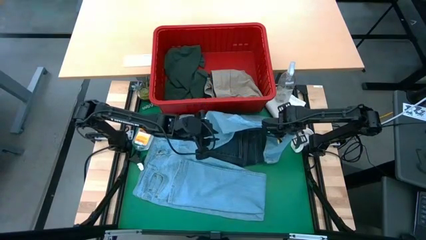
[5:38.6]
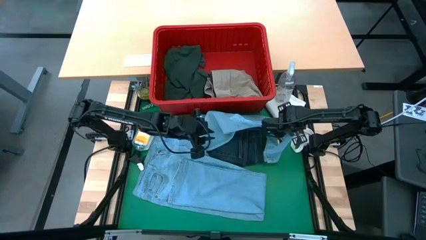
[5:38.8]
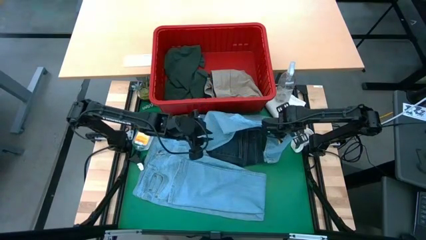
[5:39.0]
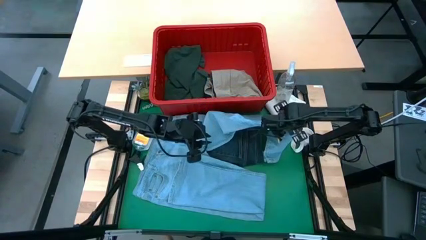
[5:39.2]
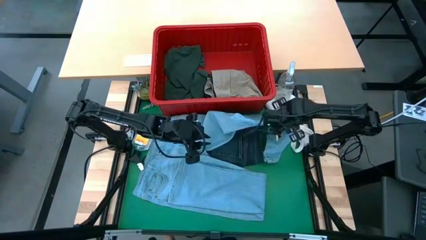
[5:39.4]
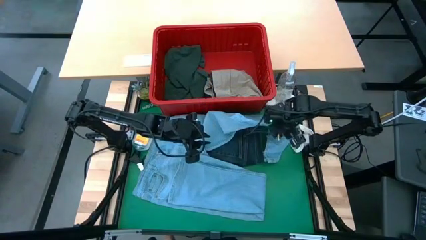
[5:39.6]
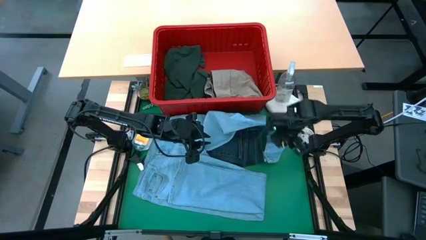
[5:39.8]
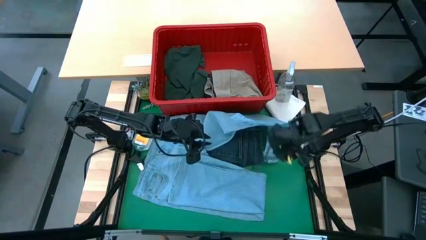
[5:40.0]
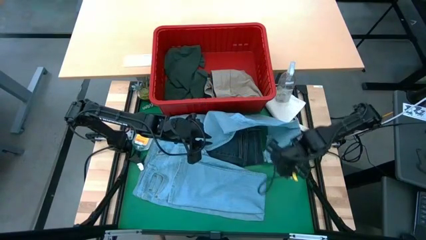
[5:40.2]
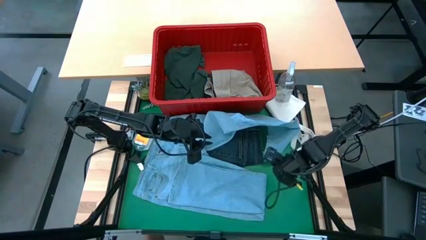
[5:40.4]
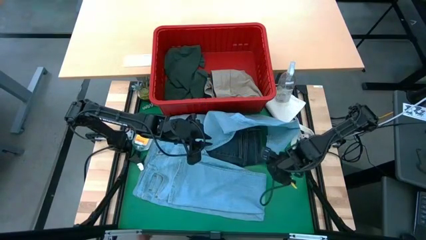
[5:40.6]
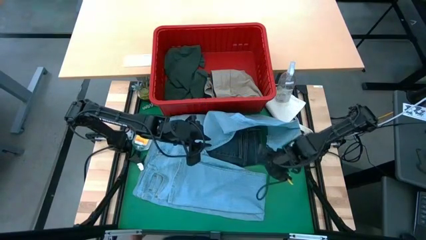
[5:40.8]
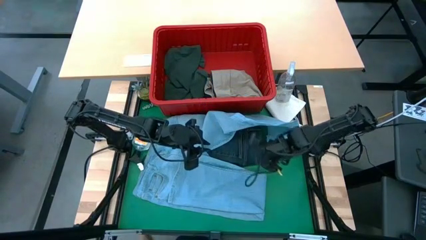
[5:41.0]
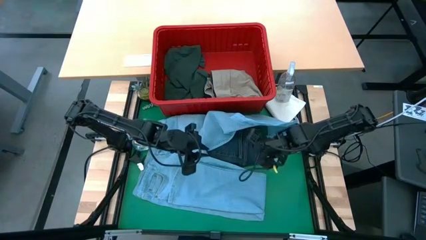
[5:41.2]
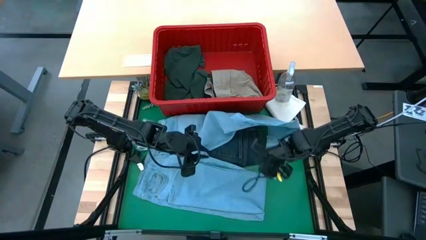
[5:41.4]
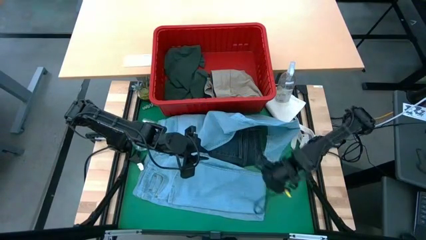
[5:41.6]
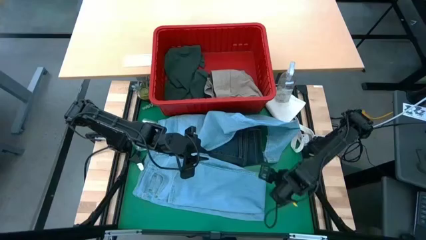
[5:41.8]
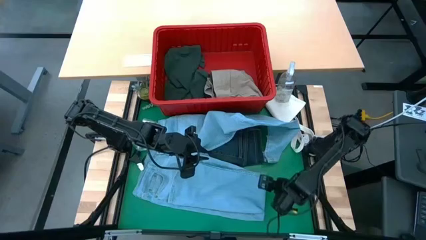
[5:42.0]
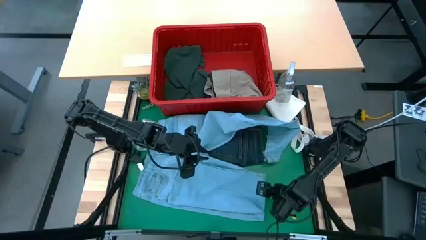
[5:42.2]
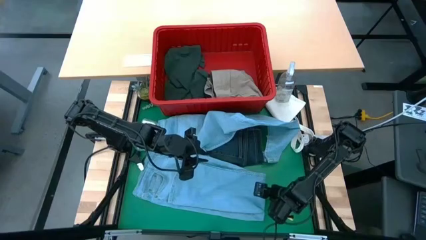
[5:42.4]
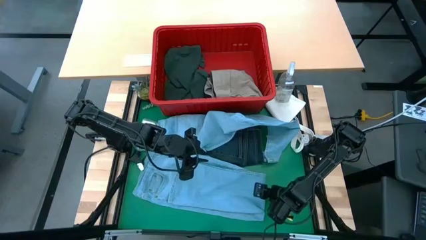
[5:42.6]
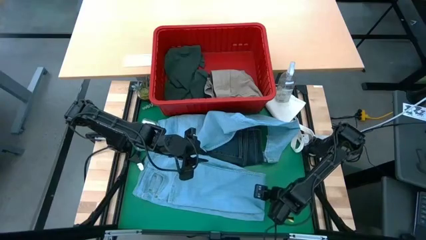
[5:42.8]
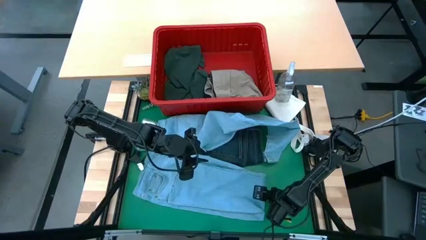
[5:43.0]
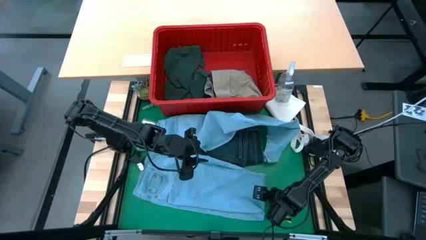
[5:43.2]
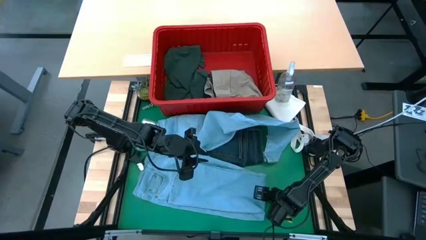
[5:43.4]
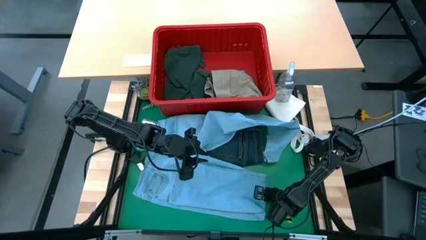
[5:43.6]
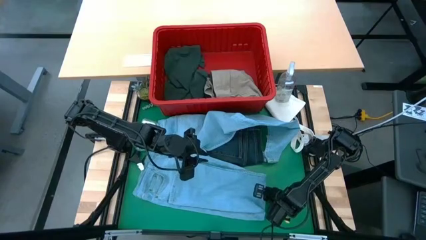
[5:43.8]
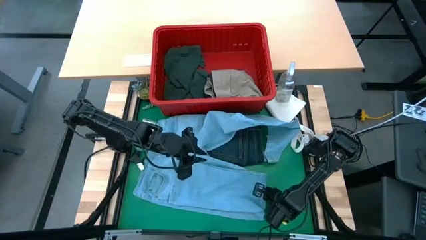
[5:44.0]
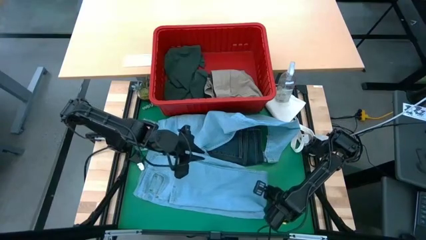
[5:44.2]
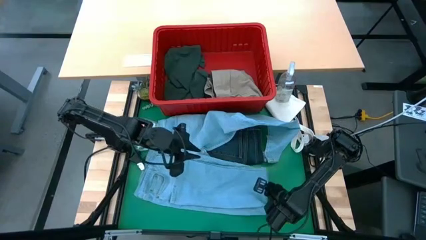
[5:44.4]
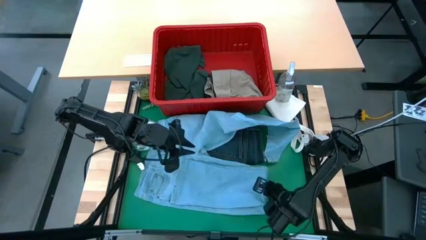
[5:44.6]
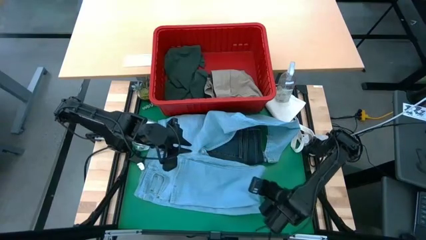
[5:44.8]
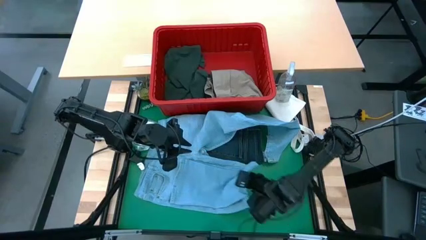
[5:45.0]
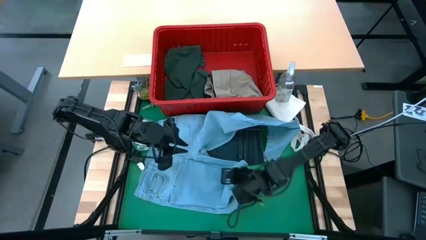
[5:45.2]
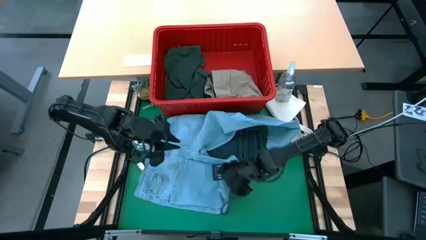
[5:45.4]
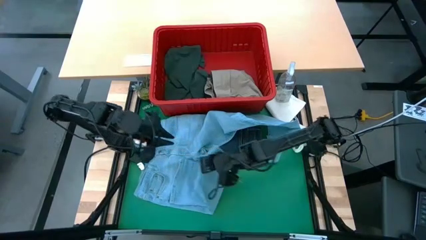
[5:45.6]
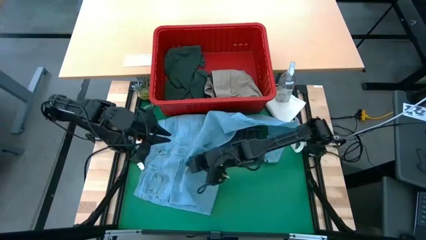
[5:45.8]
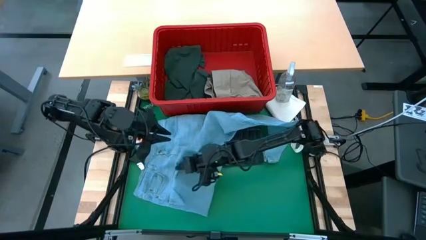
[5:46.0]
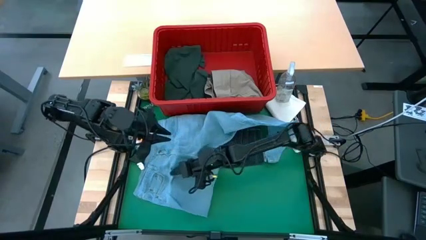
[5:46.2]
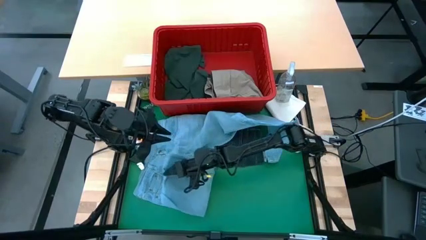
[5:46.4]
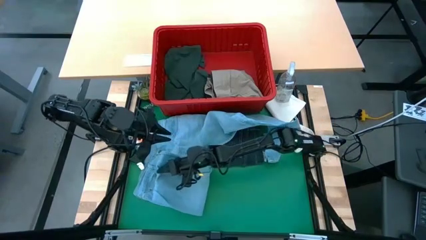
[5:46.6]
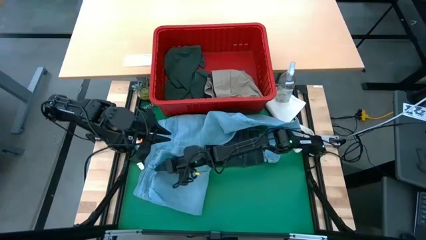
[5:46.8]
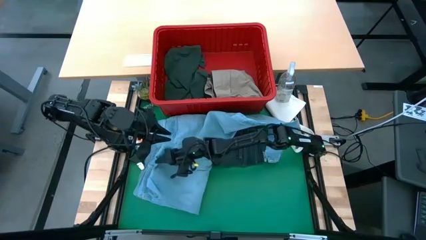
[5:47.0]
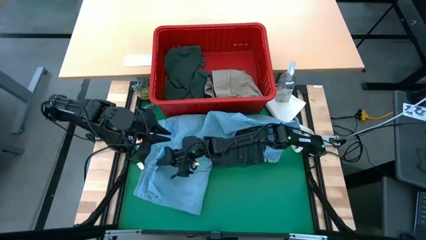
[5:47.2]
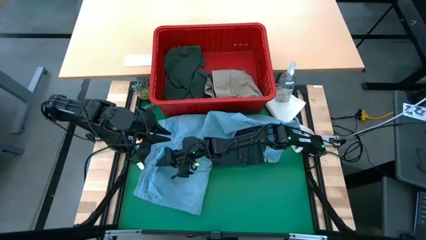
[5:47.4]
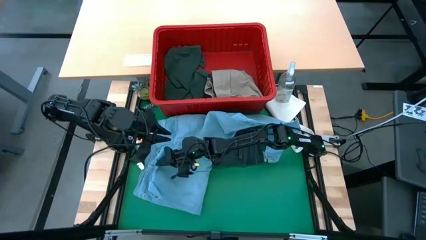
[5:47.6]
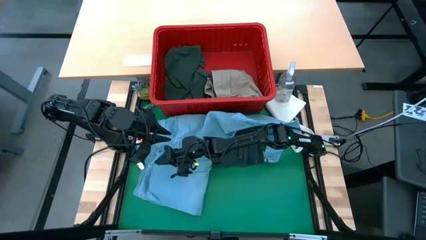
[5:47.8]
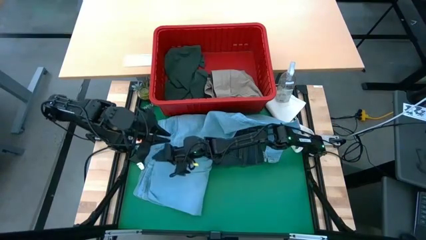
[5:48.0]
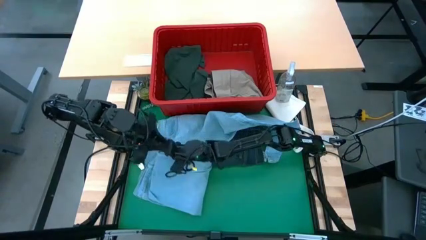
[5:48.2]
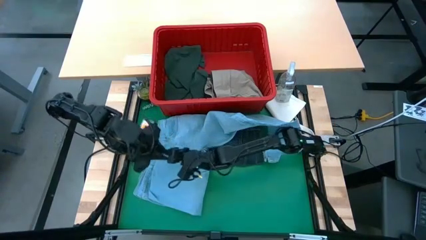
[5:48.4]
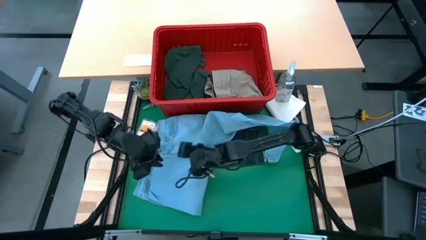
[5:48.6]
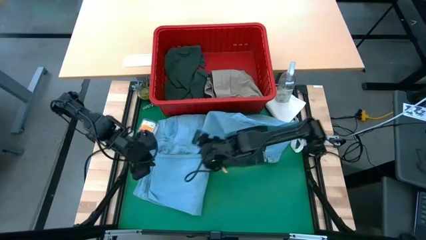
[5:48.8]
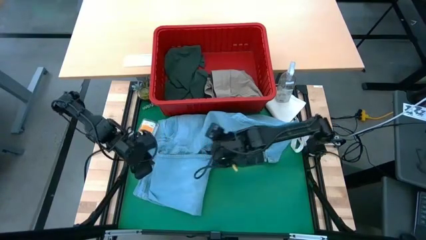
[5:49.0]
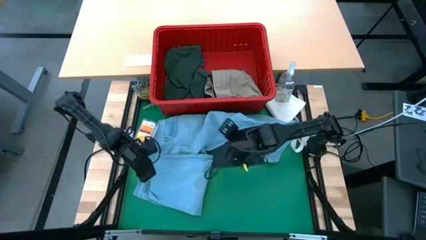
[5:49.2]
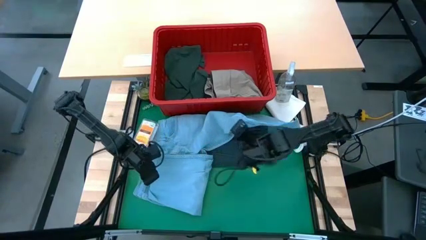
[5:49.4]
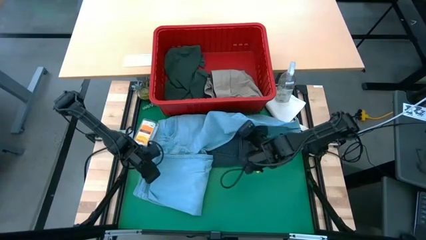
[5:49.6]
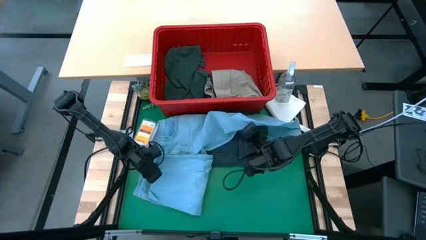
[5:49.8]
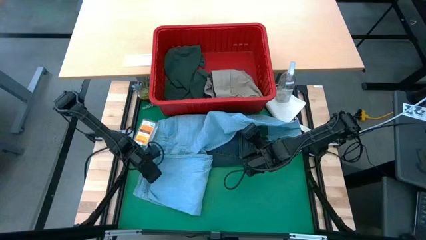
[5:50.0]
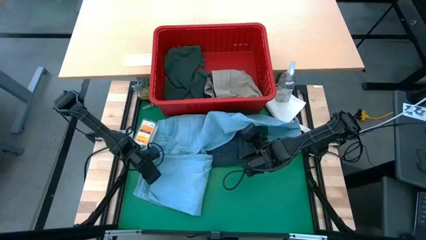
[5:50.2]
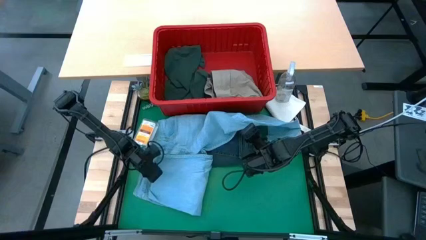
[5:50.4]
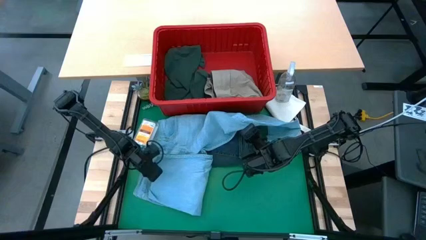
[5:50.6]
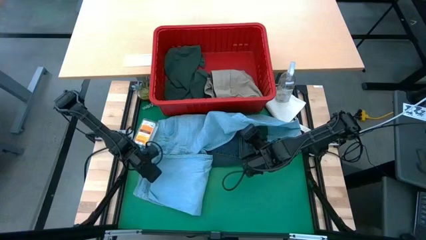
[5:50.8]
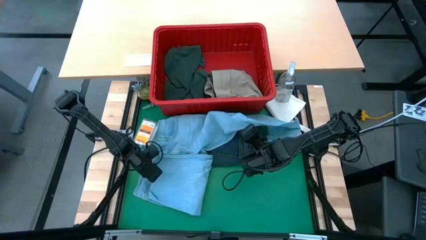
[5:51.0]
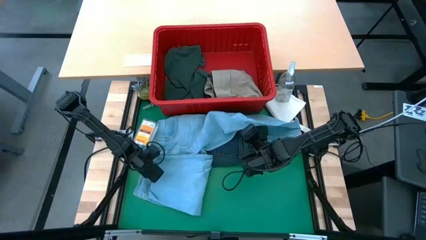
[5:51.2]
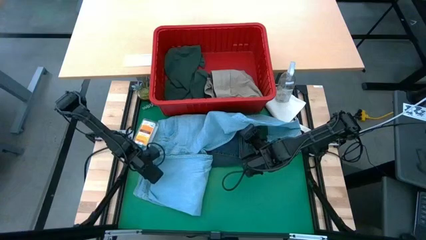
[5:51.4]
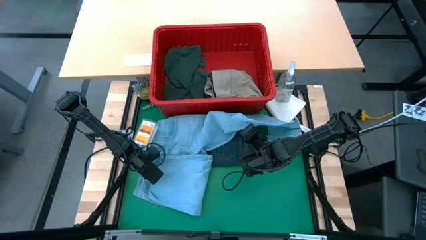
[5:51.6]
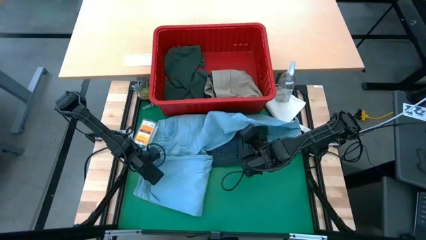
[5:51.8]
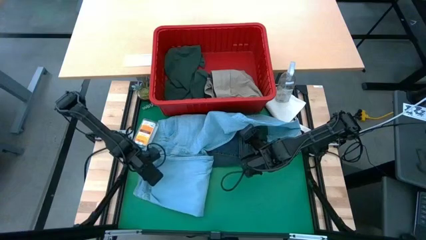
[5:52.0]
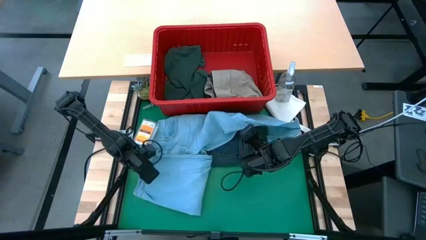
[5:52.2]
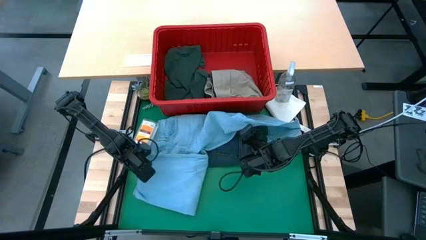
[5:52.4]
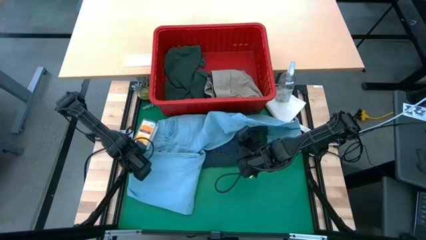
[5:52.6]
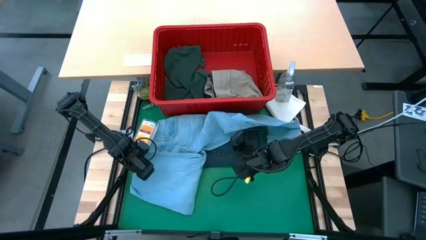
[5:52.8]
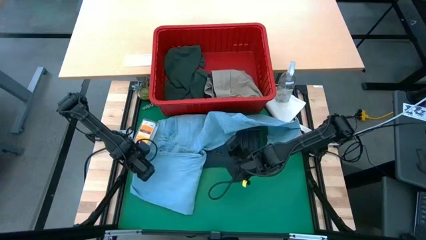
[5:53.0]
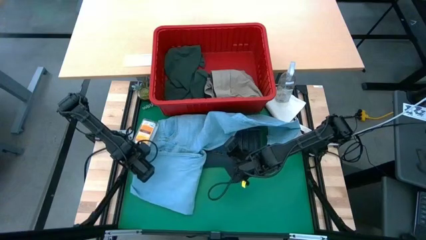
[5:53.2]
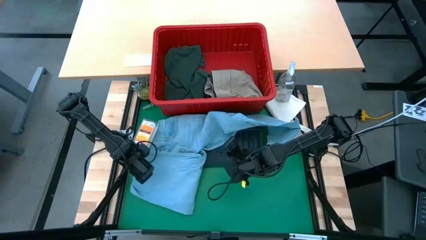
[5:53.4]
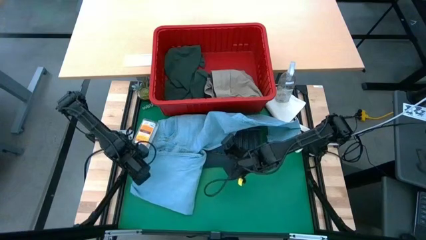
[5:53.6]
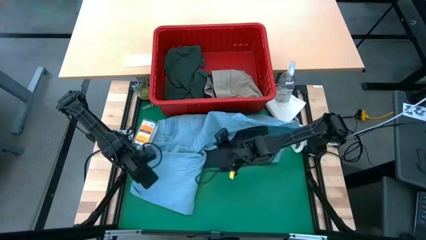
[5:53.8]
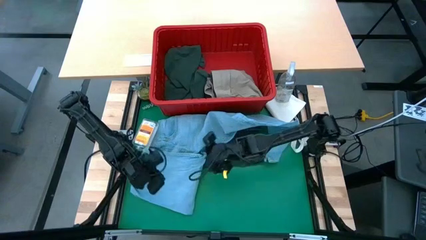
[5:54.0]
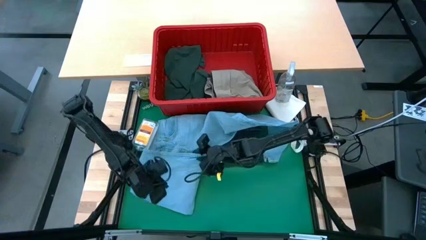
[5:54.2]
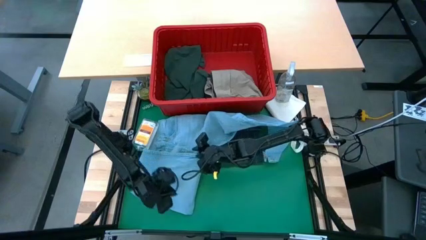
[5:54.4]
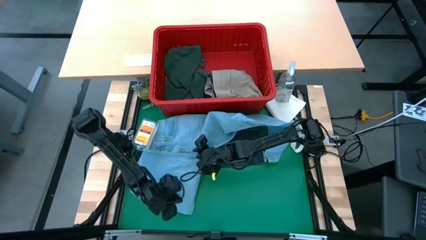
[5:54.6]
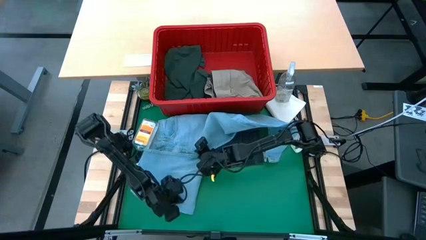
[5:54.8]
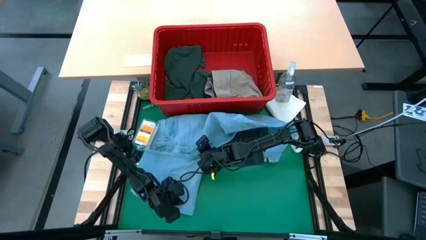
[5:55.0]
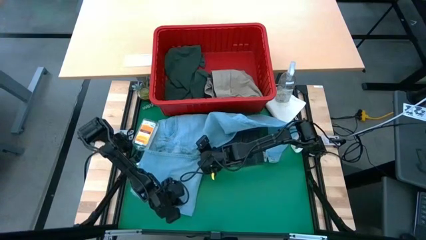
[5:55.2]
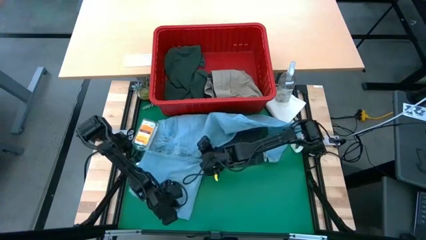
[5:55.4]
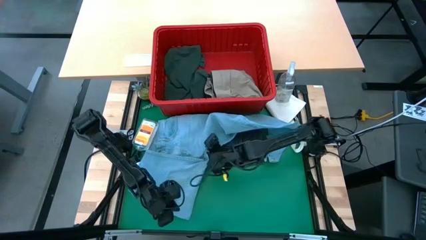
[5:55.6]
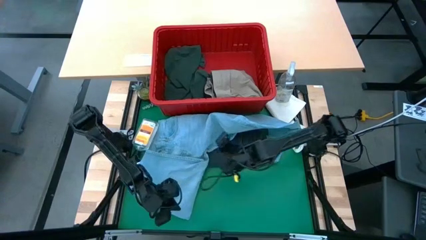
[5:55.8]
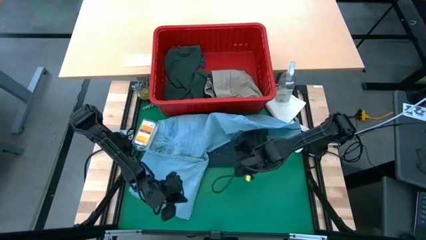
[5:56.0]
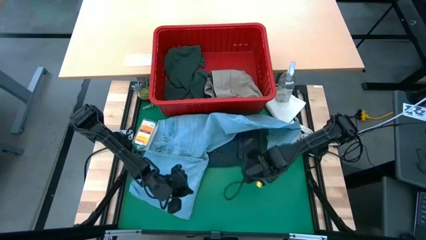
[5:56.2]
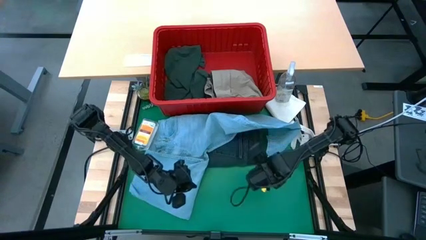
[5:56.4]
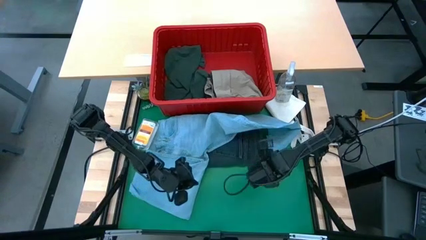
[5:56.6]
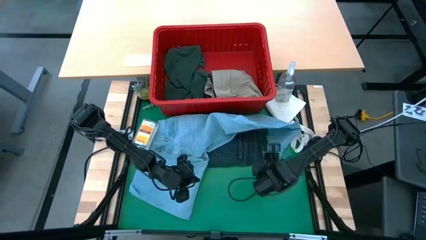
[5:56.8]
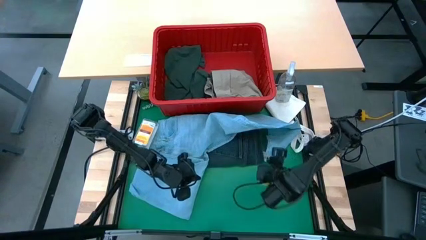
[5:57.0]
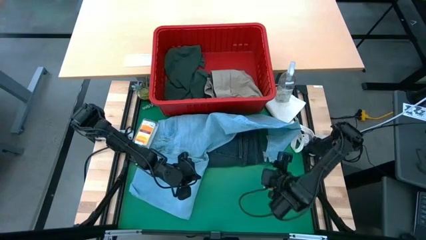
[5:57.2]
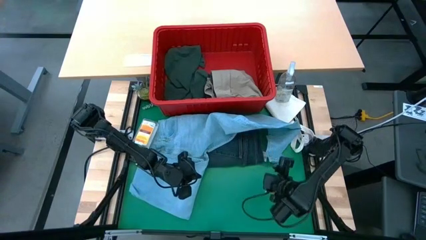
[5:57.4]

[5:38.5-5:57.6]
Task: Fold laundry
Fold the light blue jeans
